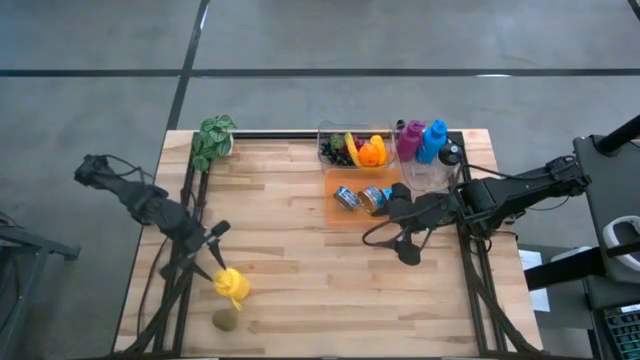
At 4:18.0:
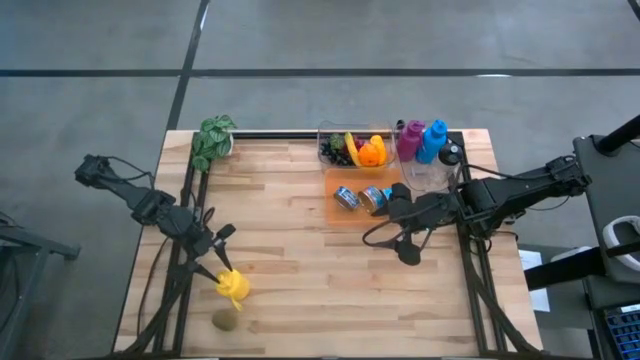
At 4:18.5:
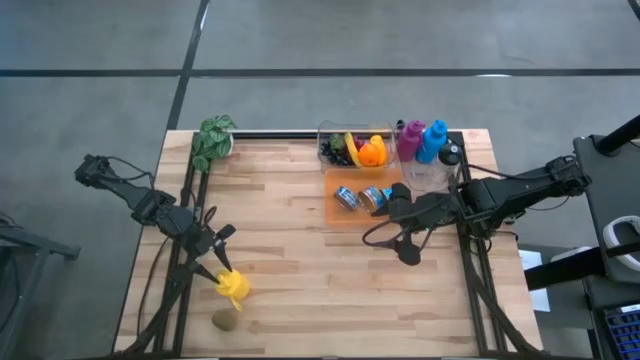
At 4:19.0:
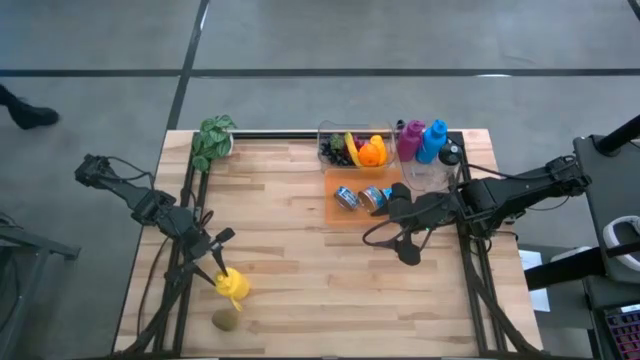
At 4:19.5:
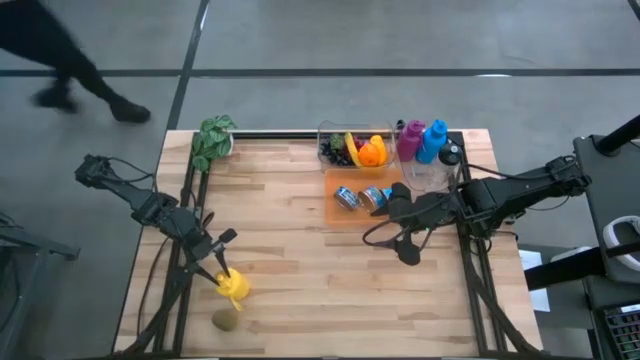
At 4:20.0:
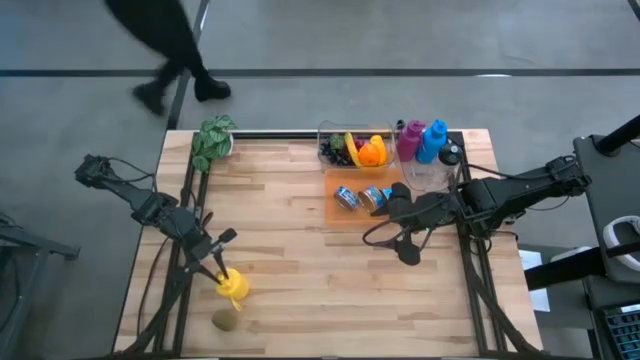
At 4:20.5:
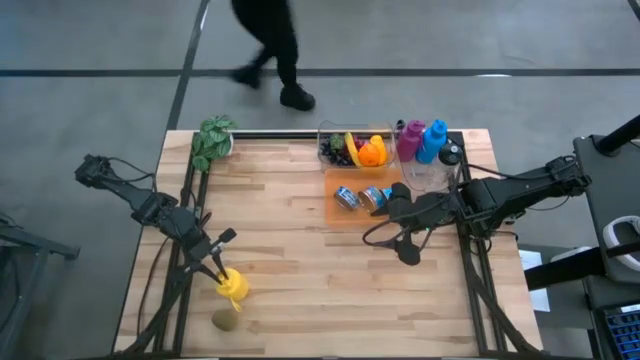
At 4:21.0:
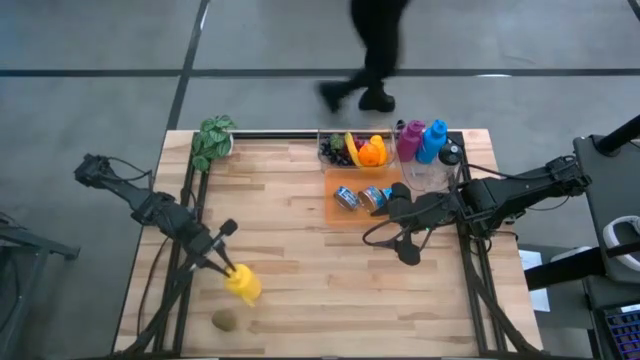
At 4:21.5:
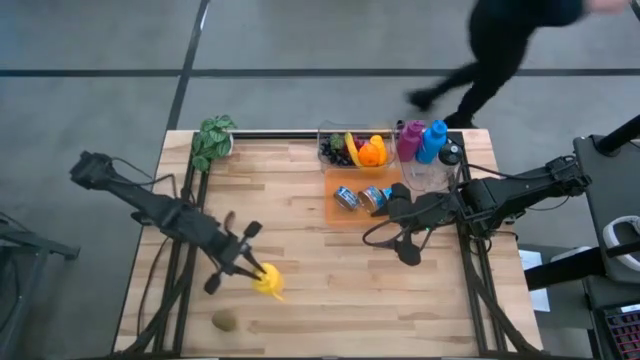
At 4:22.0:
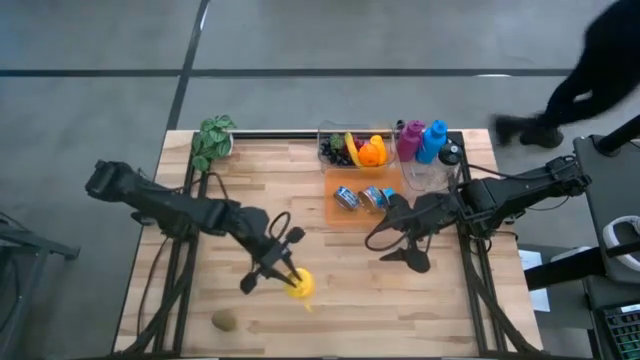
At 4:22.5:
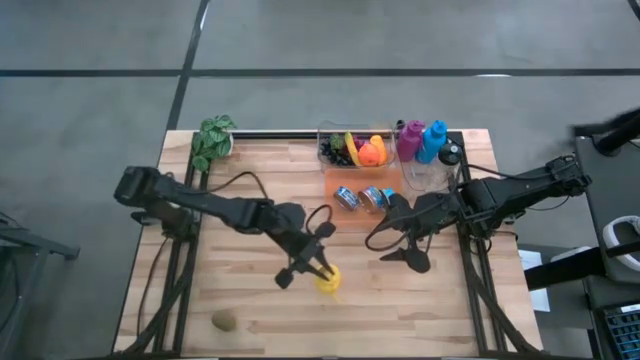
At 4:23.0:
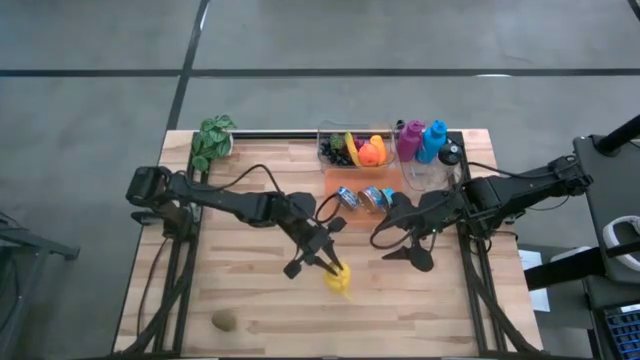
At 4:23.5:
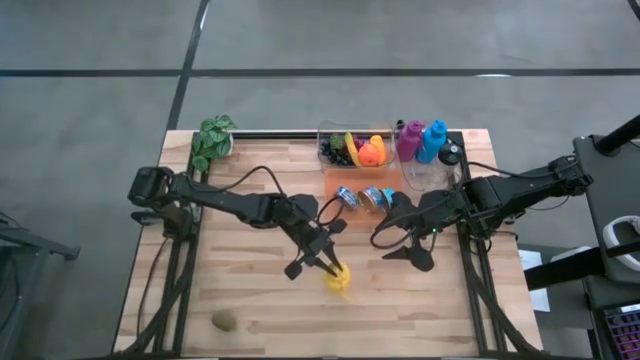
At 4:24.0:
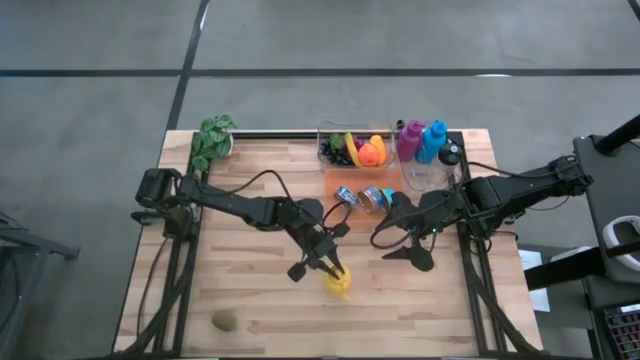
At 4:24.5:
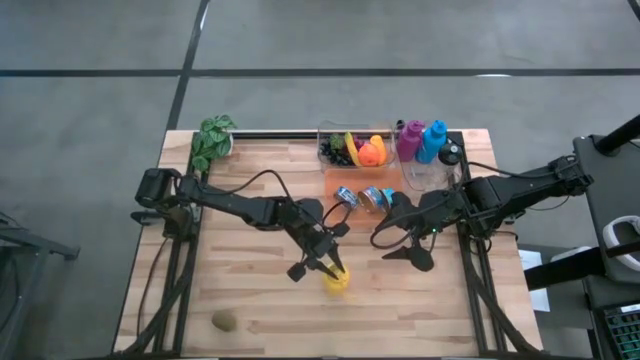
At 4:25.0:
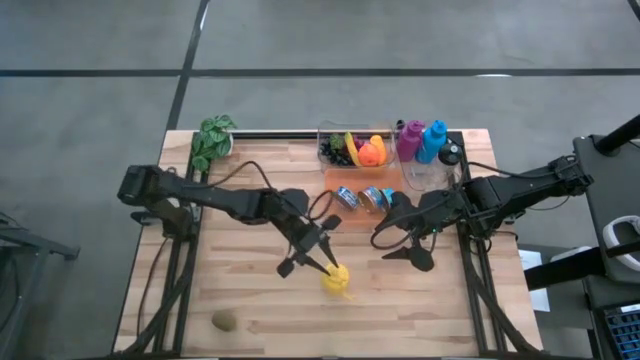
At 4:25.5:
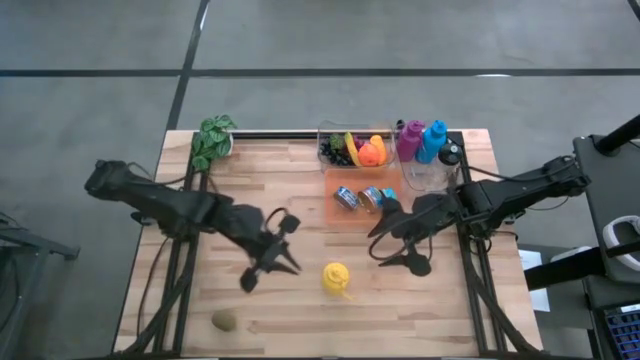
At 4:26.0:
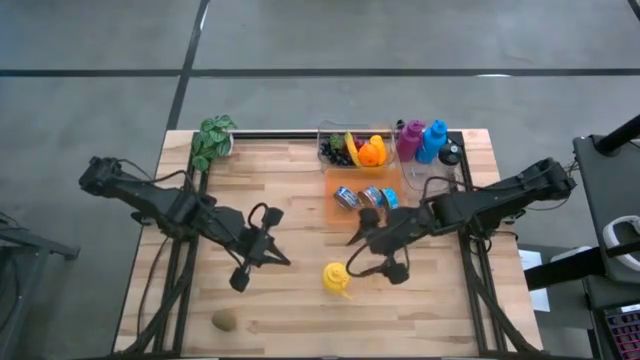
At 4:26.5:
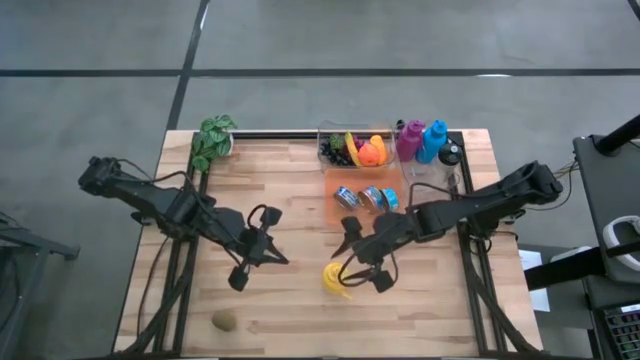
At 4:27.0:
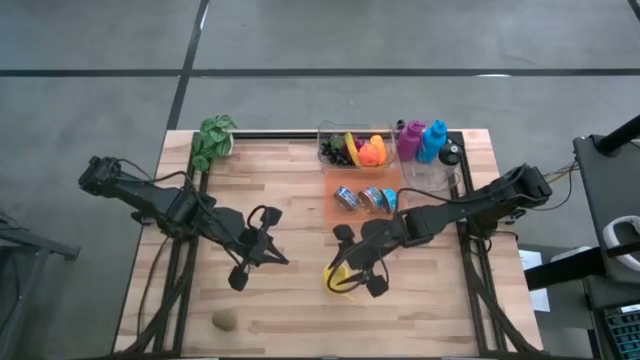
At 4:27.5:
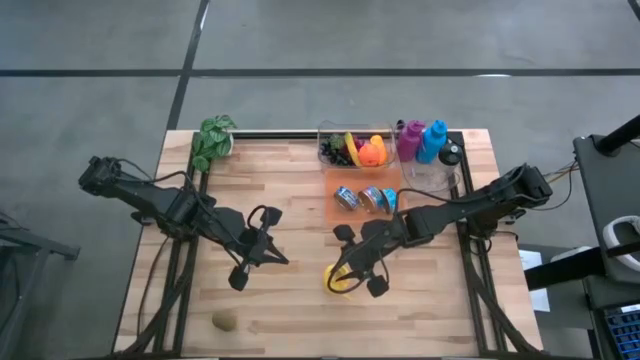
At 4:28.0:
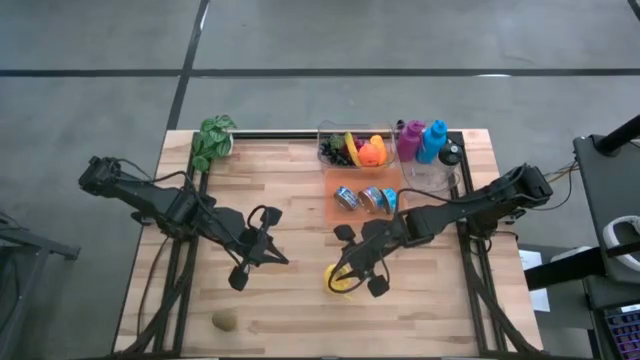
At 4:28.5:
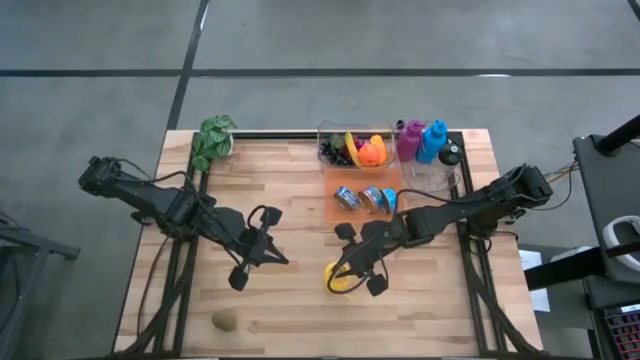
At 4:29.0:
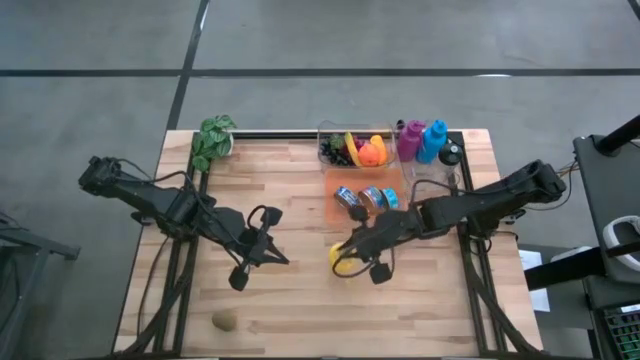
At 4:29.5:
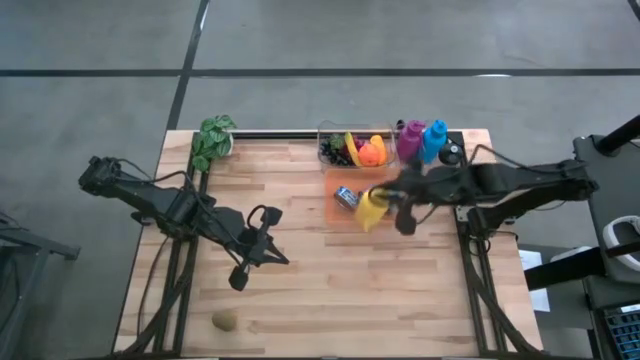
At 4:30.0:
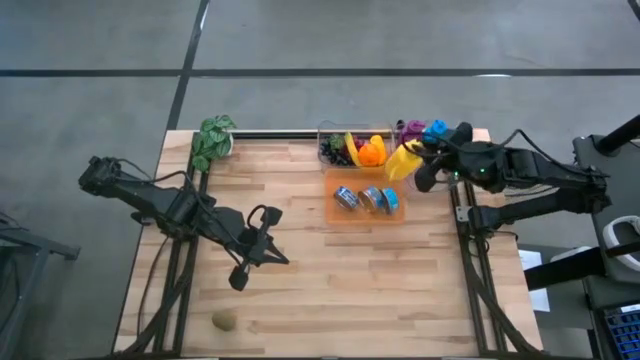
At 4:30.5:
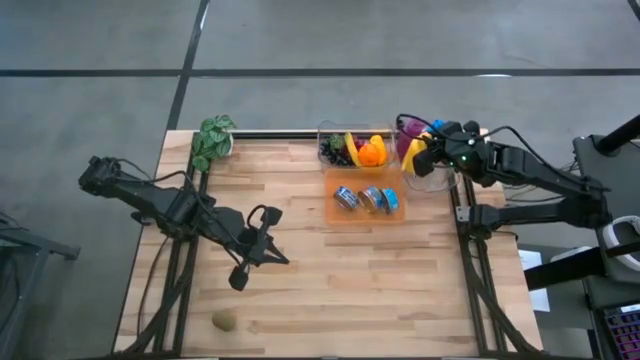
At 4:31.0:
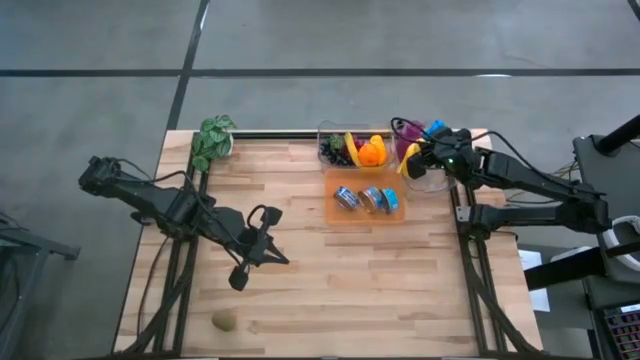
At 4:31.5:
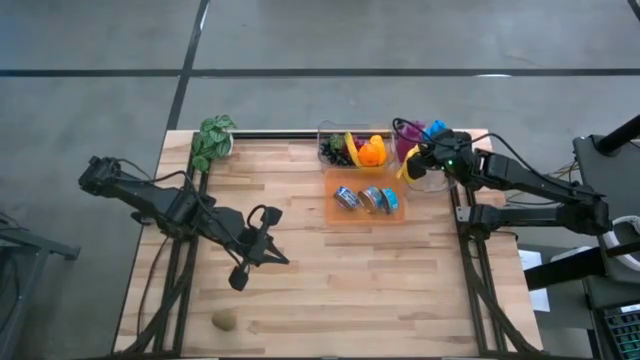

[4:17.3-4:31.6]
Task: Pick & Place Food Item
Put the yellow water bottle into the right transparent bin

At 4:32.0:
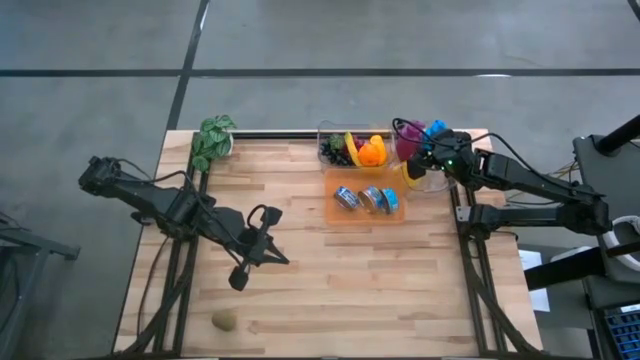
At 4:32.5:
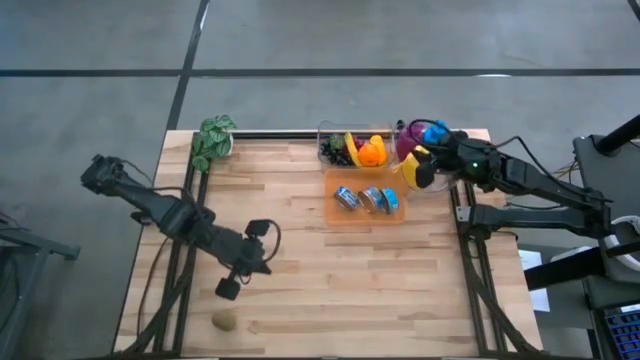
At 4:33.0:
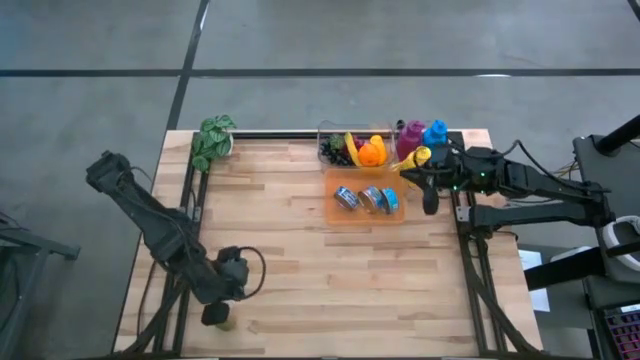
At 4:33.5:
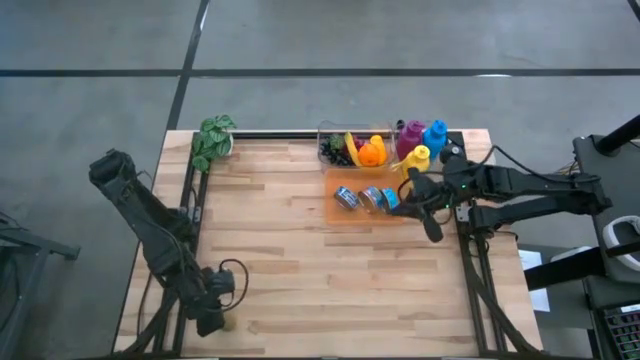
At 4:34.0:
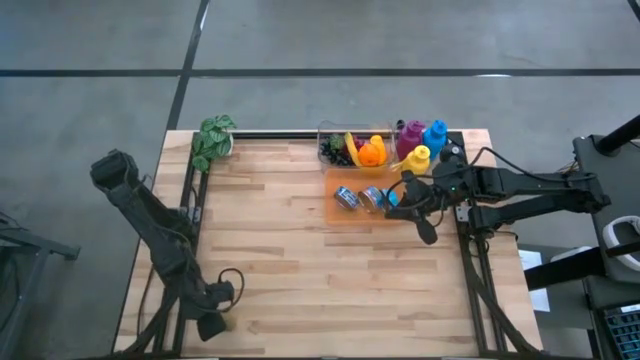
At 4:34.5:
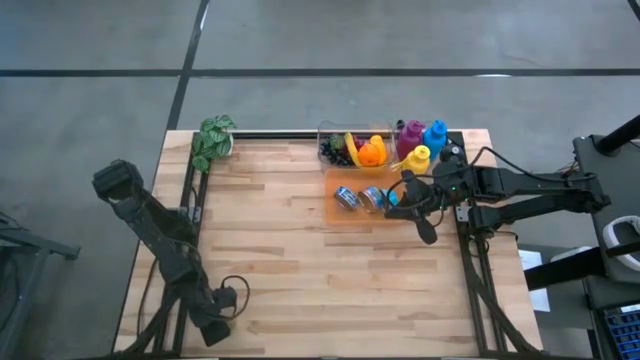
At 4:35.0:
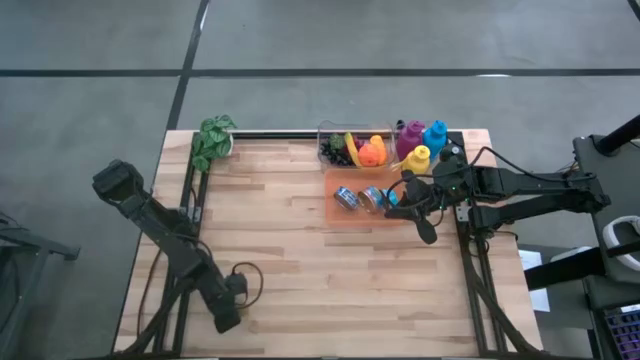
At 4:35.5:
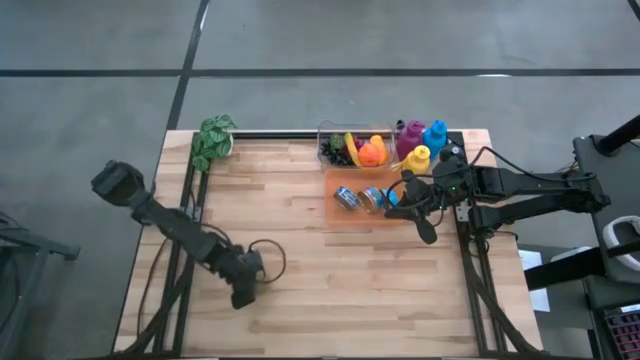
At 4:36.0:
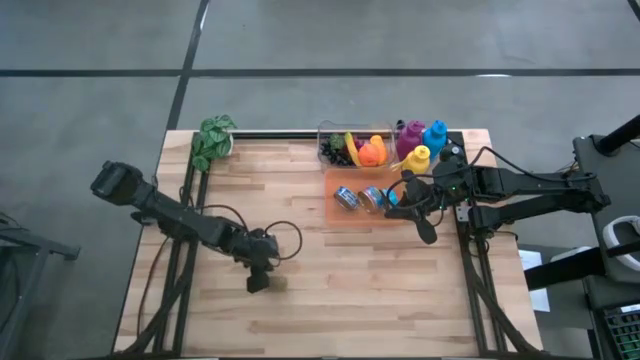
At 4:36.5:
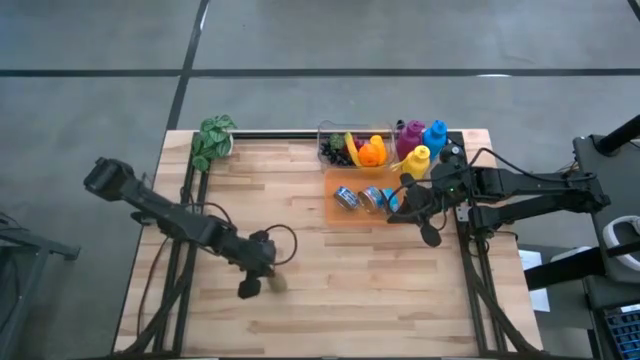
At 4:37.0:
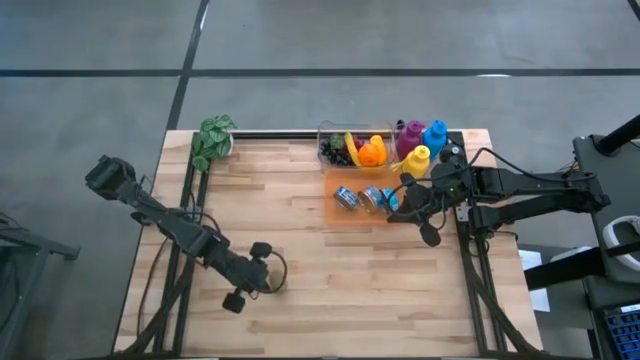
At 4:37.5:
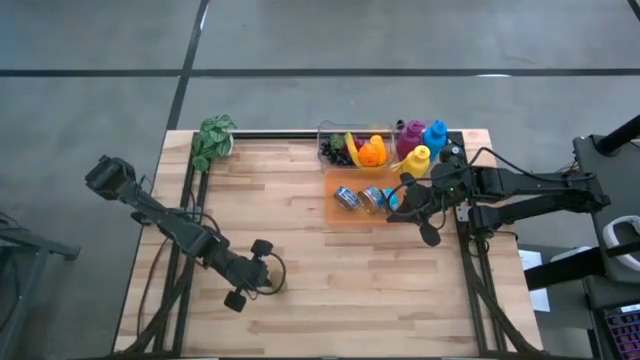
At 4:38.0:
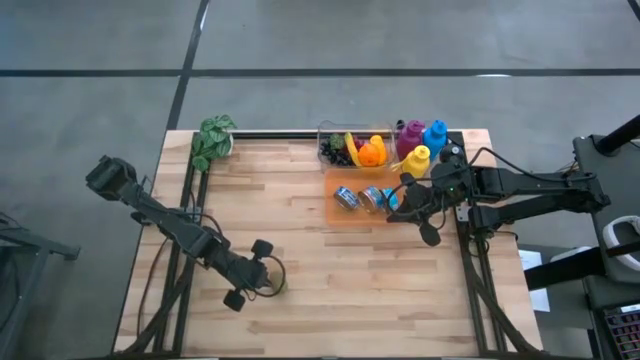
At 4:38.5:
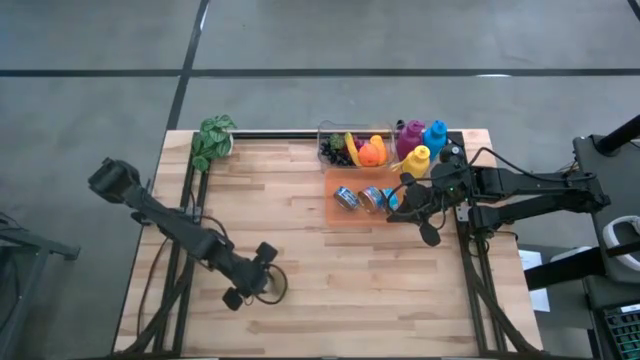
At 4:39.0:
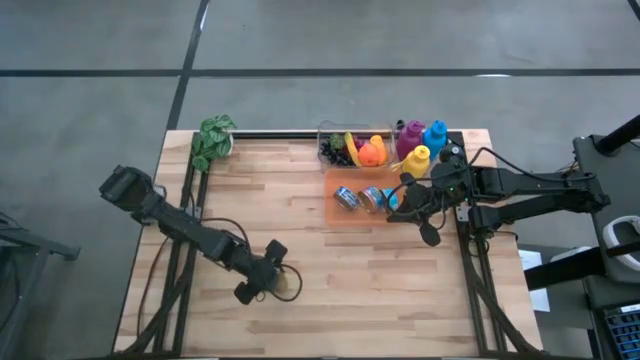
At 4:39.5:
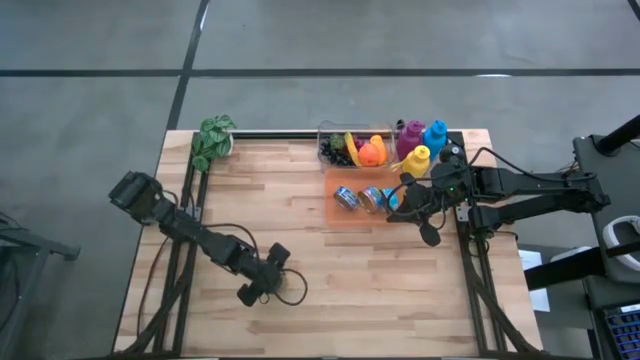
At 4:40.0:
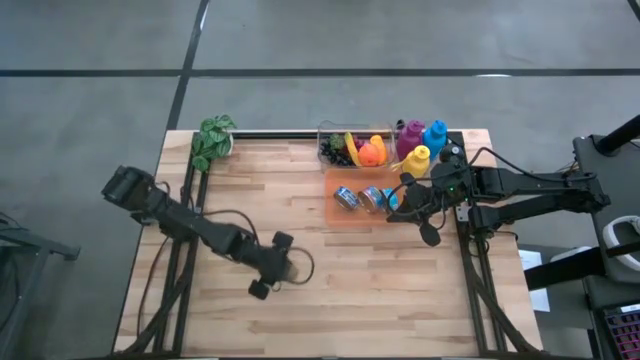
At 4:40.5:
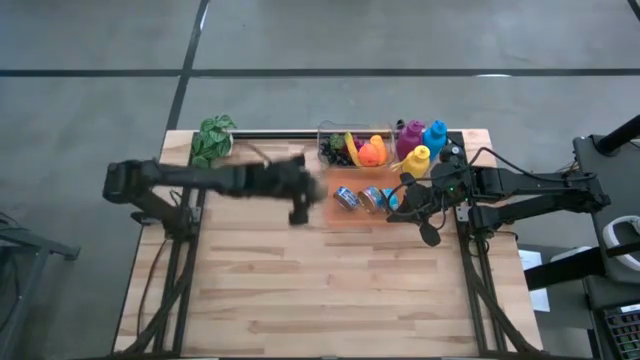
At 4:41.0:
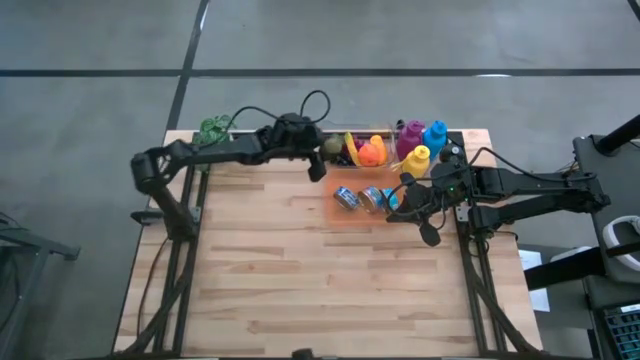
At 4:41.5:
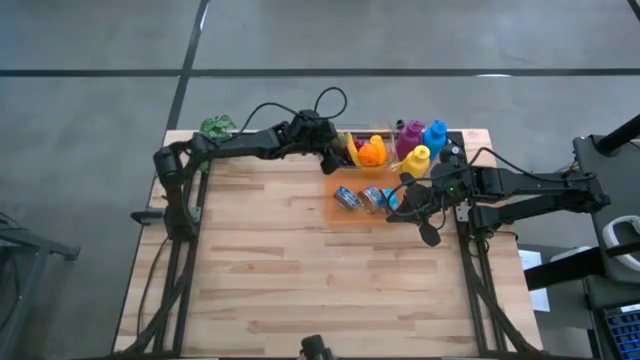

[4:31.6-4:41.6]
Put the kiwi into the left transparent bin
